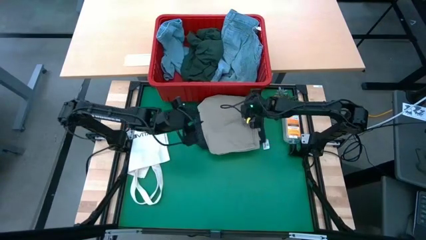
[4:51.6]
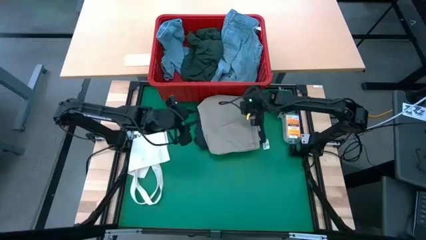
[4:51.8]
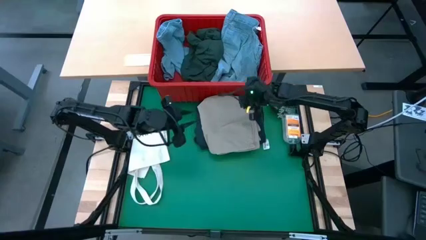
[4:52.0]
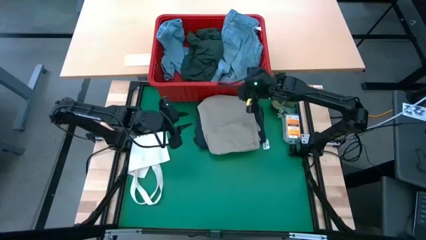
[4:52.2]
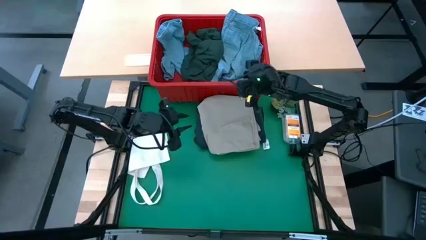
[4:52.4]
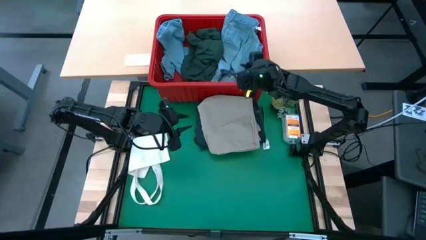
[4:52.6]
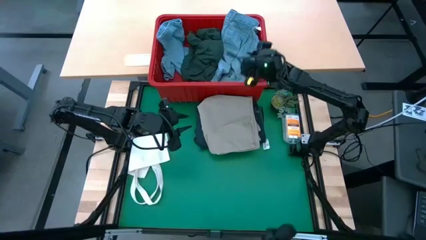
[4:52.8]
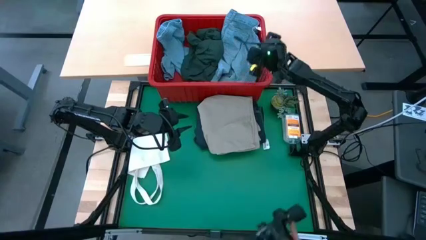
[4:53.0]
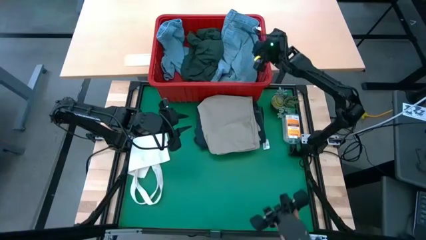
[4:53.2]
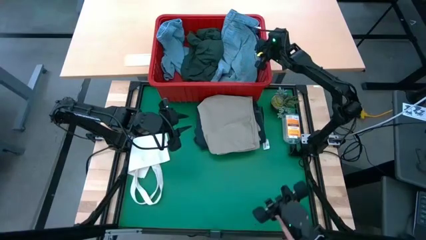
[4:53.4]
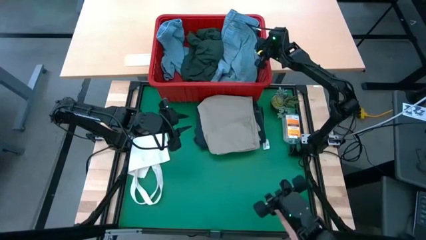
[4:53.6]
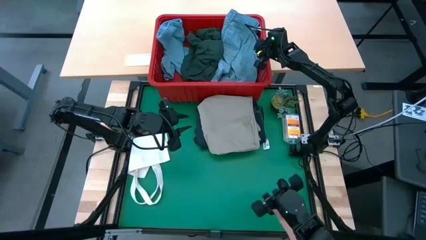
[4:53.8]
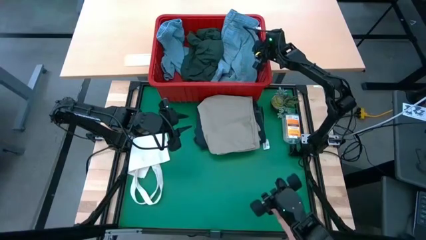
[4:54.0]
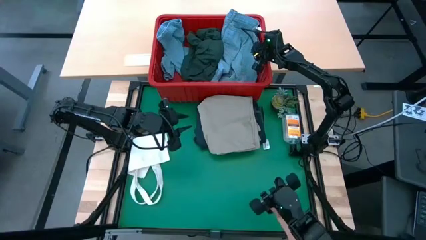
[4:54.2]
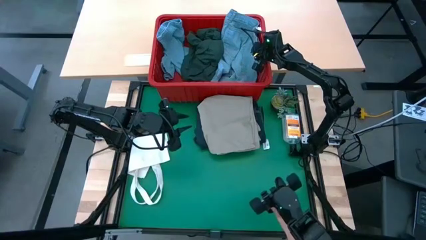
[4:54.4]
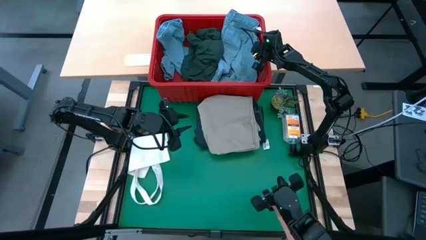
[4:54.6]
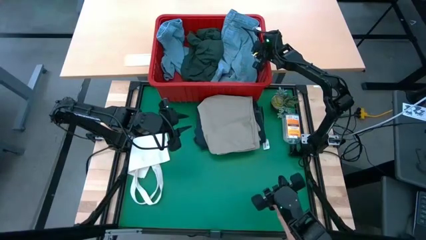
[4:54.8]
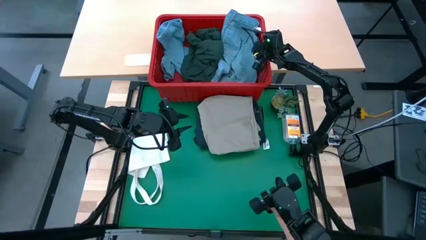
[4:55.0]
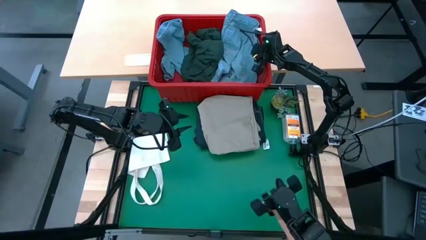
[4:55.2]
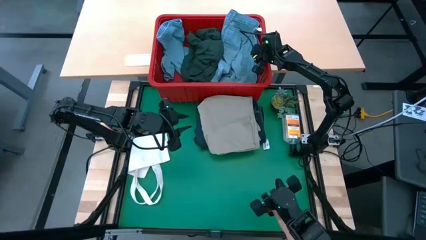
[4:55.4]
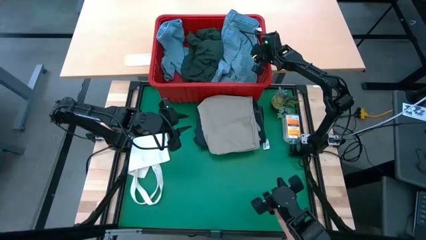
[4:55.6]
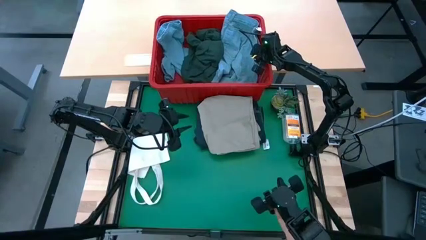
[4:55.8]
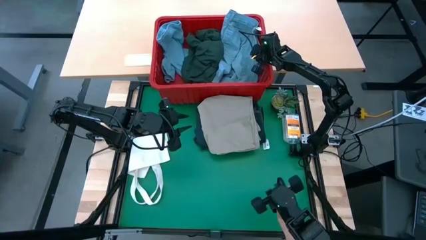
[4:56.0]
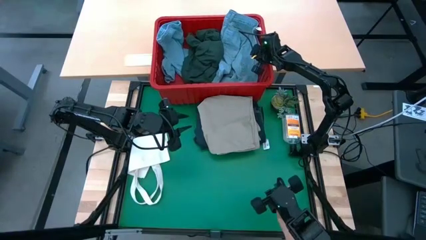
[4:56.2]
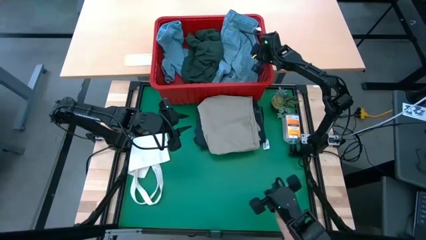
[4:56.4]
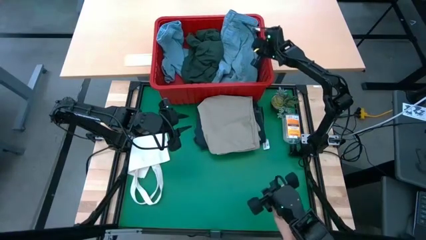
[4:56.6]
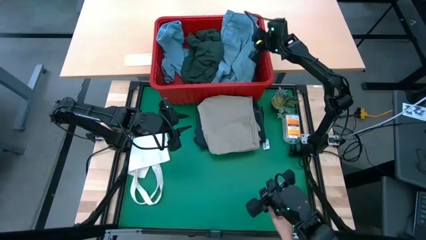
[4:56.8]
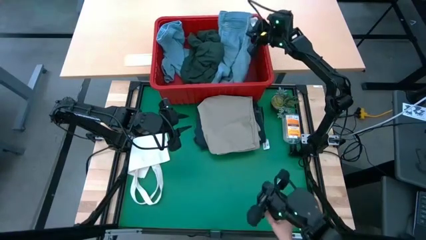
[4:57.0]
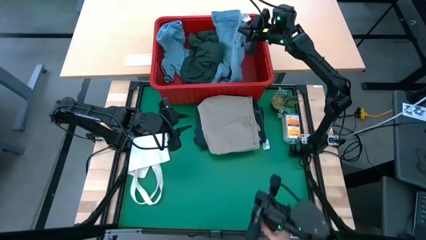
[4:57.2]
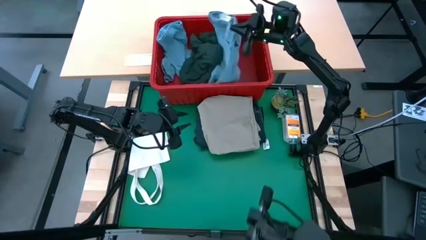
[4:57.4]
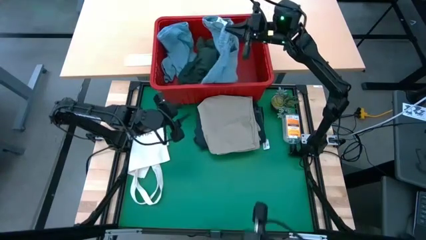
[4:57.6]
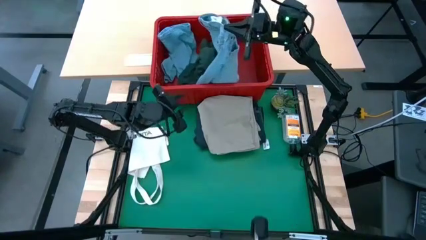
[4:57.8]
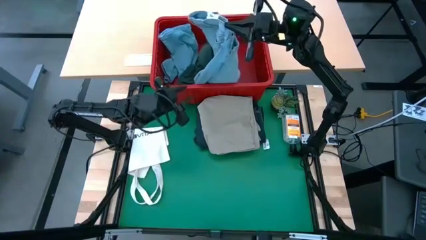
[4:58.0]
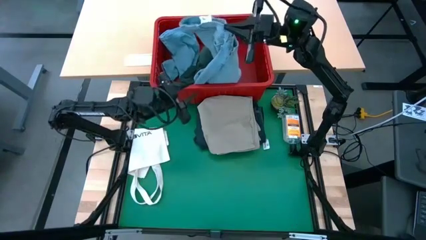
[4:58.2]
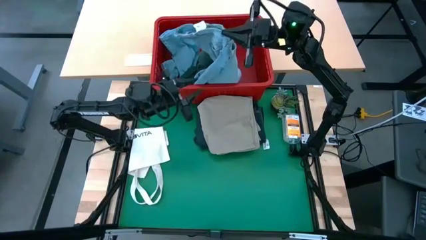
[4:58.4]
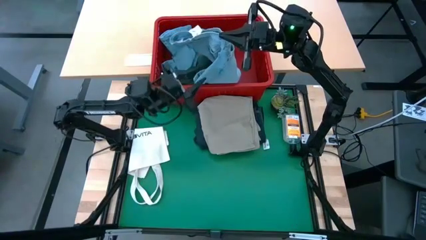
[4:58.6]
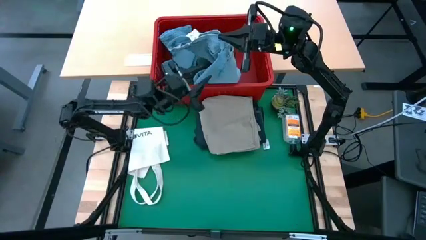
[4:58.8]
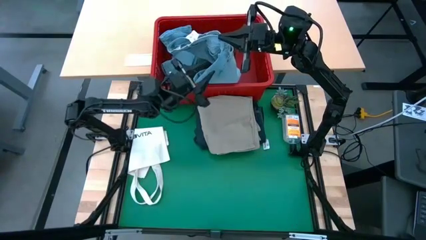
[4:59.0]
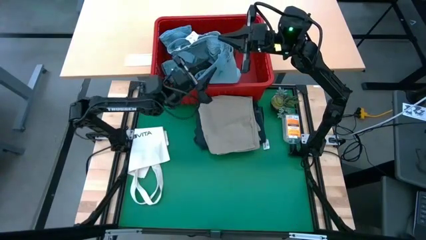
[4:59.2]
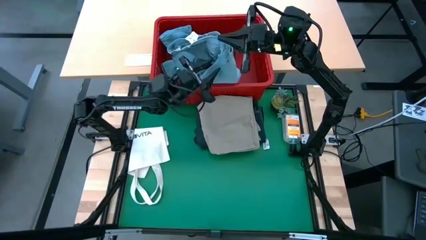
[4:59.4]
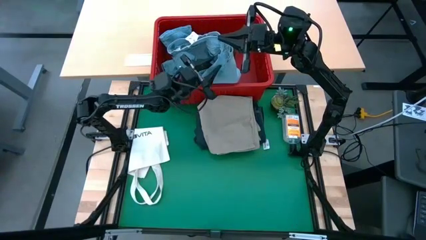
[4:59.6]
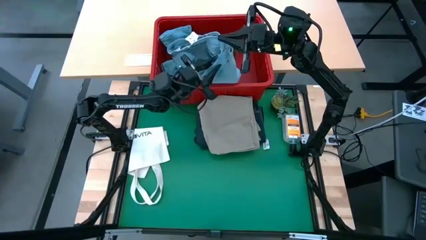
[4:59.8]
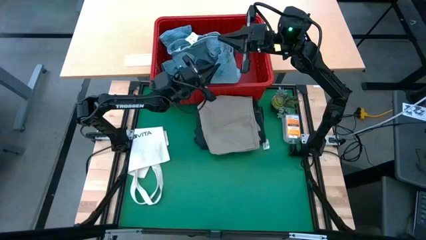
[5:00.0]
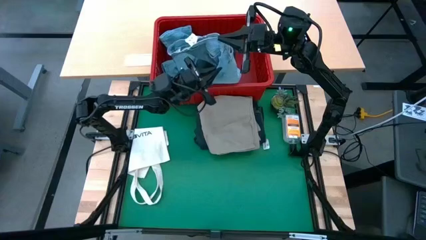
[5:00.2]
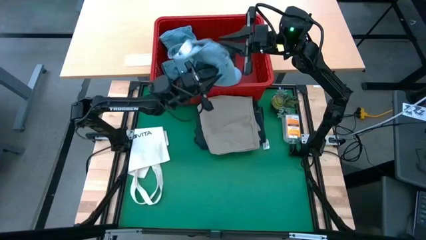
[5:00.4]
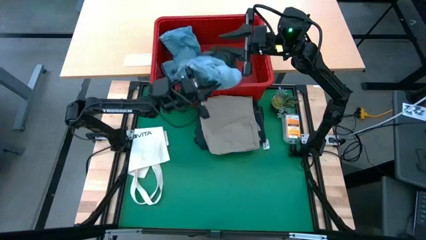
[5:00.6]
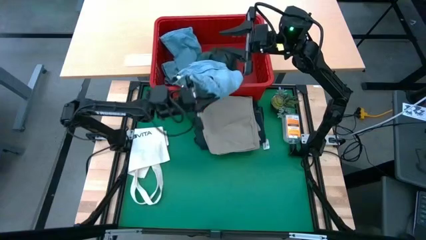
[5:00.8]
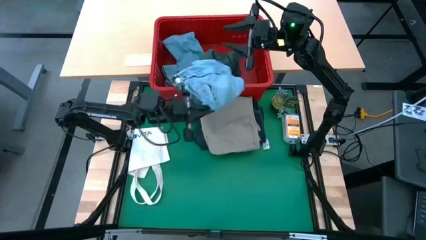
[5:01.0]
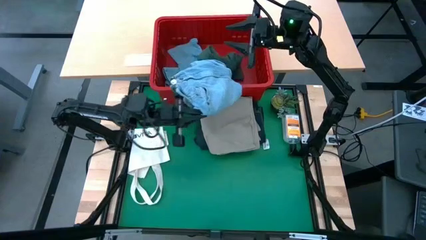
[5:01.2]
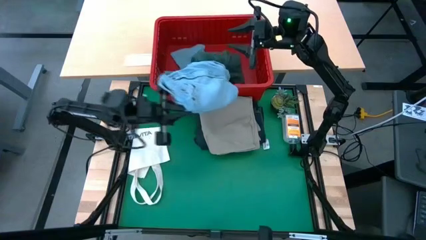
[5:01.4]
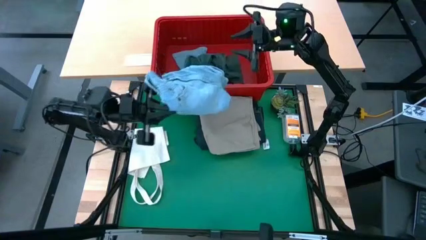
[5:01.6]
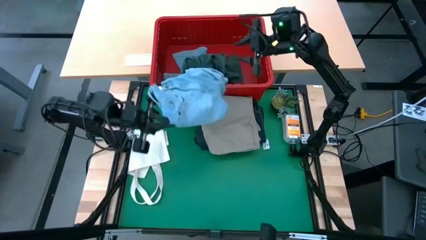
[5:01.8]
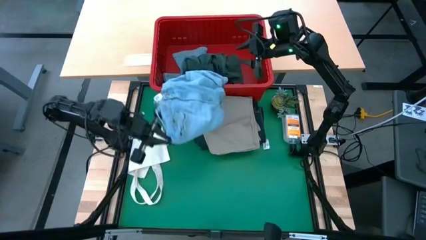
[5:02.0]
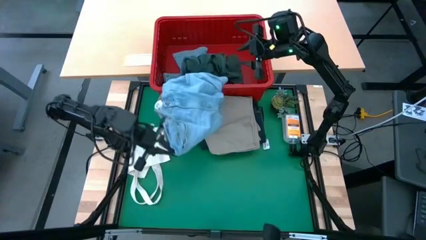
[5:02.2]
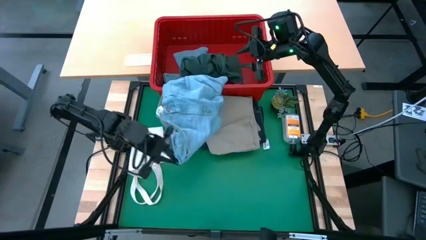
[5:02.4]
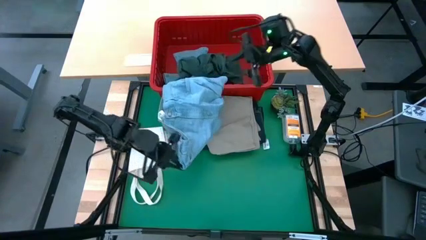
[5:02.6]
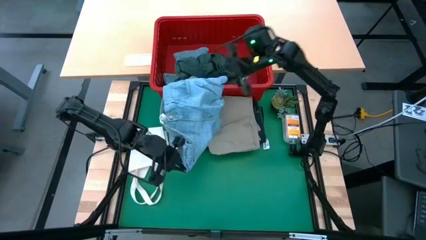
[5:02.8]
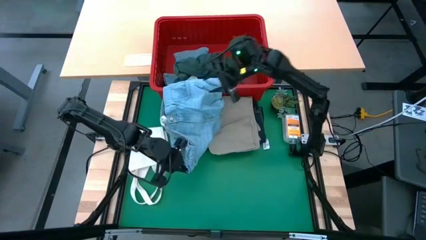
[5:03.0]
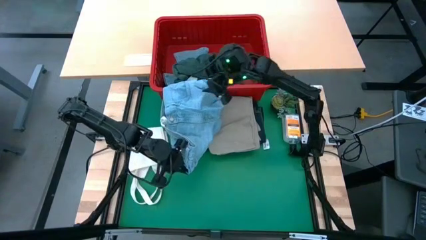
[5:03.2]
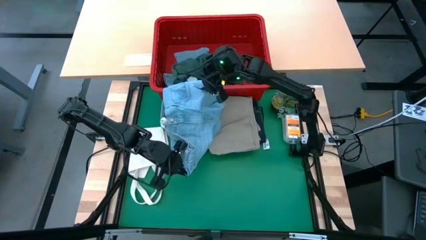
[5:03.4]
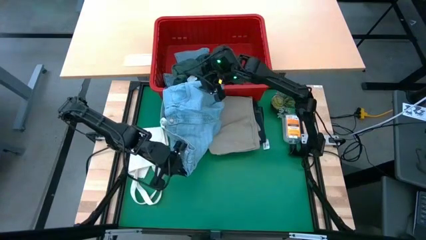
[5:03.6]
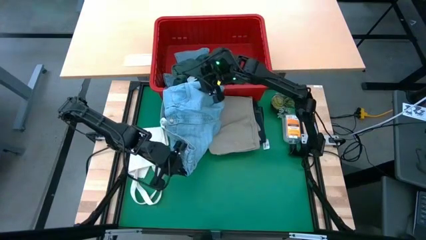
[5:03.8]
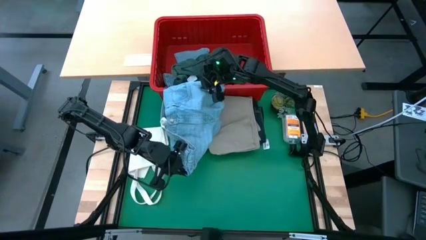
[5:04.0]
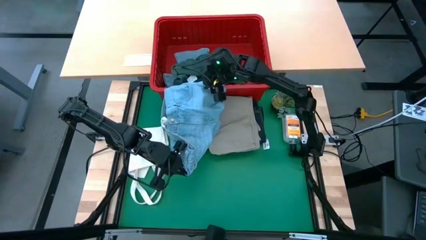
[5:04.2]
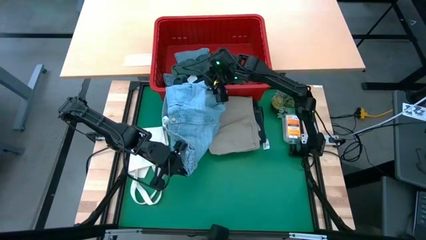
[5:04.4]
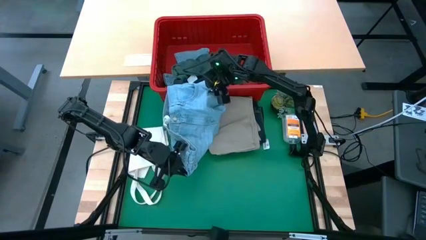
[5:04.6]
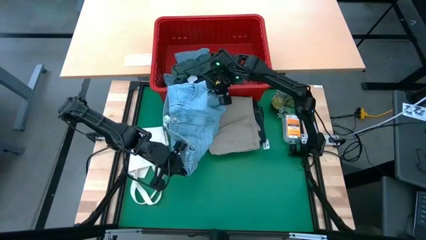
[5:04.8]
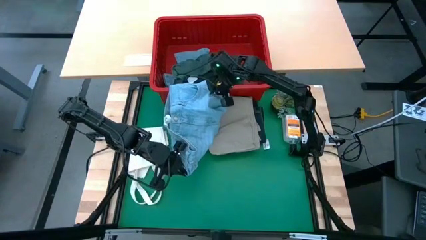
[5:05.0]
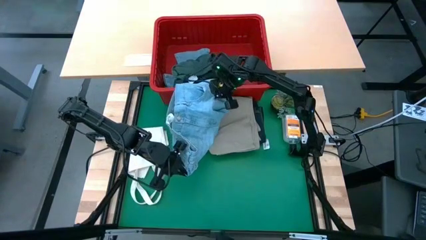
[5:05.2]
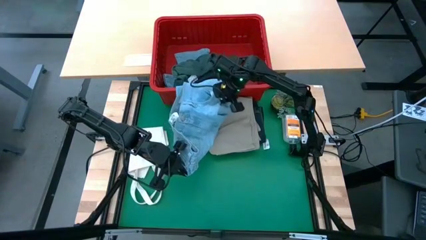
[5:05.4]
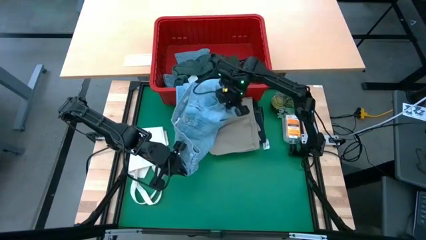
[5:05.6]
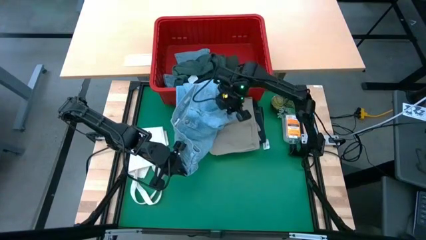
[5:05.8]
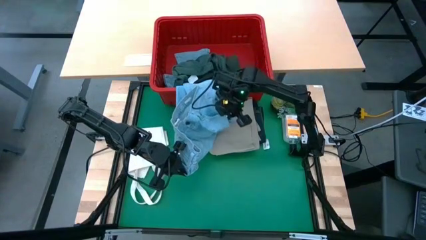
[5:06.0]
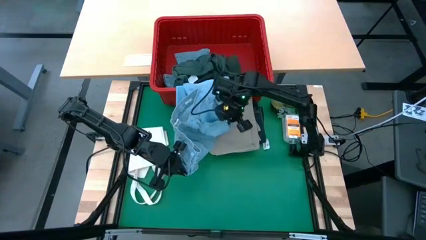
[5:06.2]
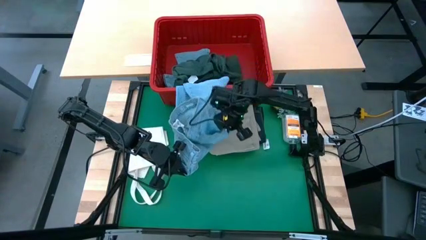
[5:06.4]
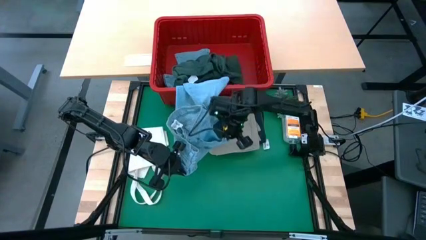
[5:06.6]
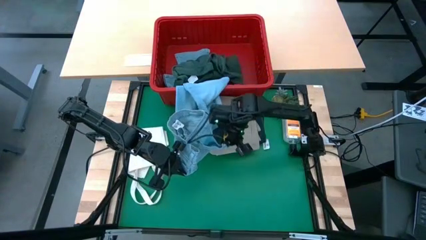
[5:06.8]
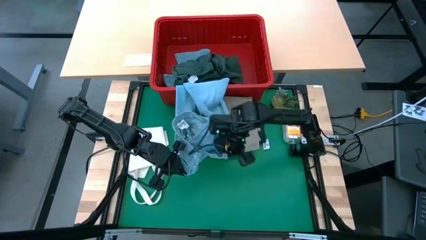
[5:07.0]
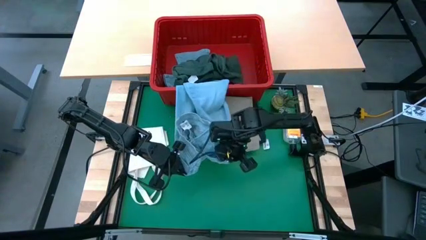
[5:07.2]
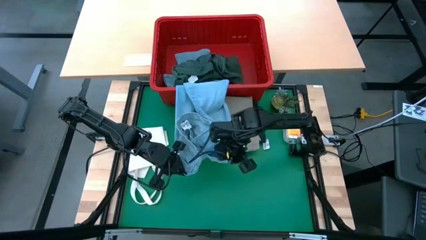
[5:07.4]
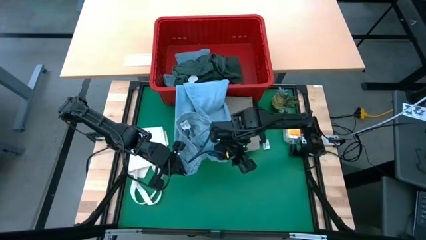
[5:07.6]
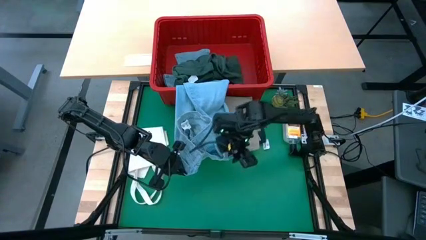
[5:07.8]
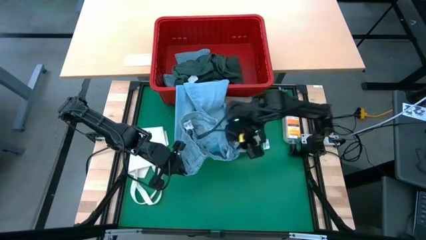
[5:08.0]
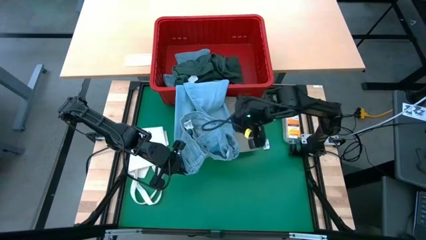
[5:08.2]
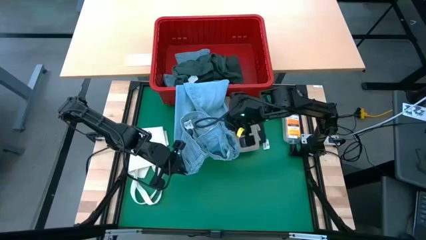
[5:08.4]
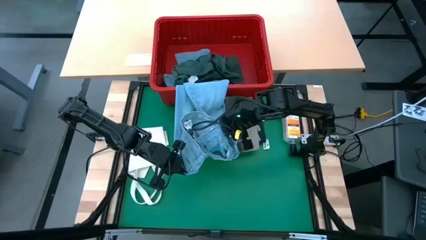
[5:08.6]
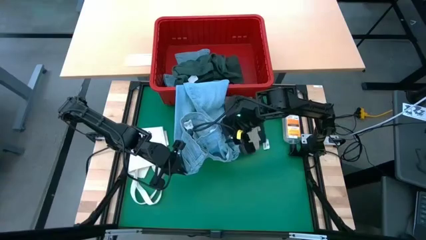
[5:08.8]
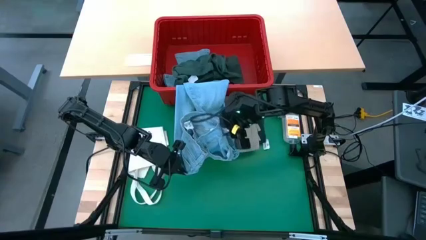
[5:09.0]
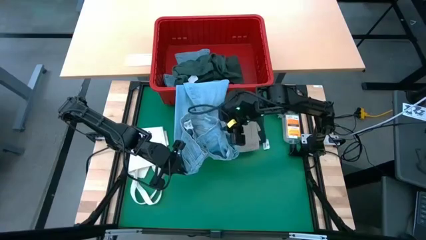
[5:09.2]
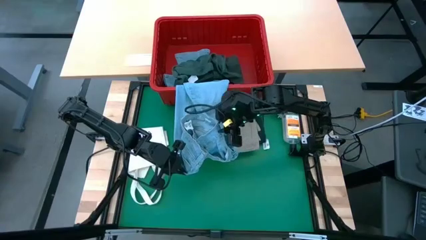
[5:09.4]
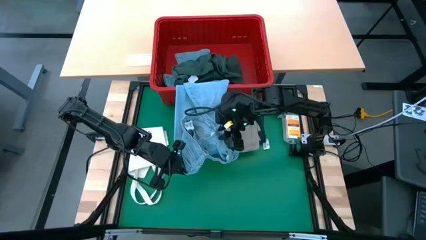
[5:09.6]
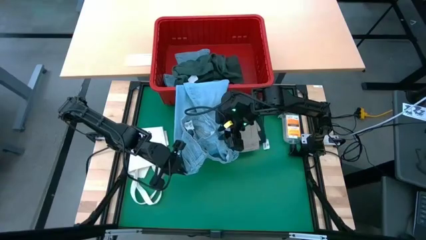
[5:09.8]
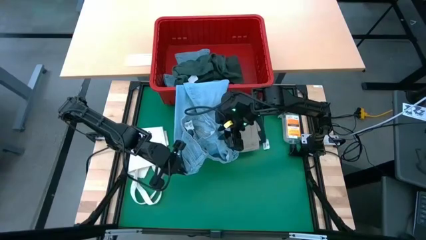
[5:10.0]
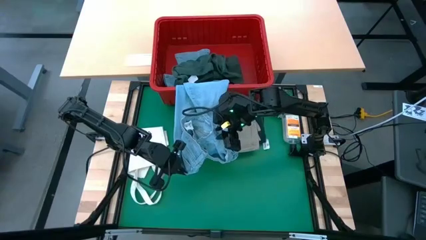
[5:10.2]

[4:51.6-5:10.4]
Task: Fold laundry
Remove the blue pants from the laundry bin
